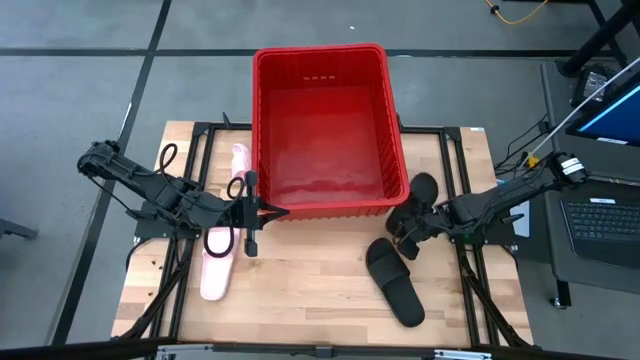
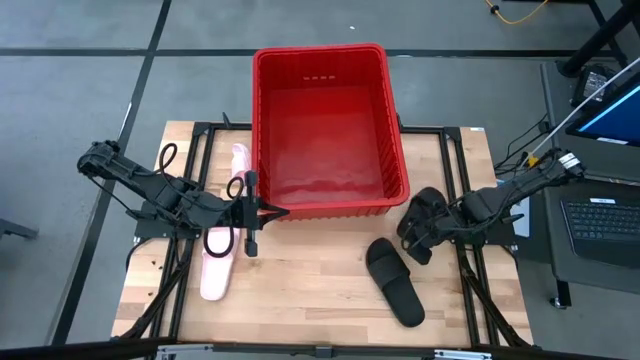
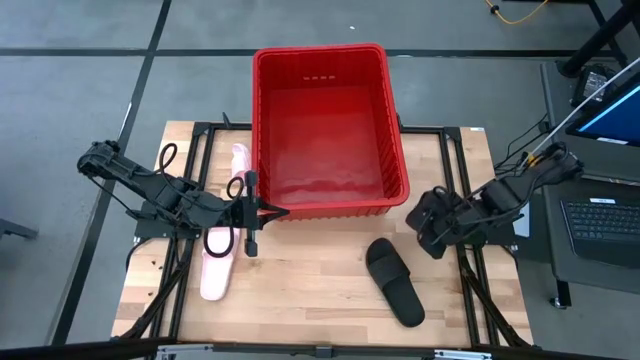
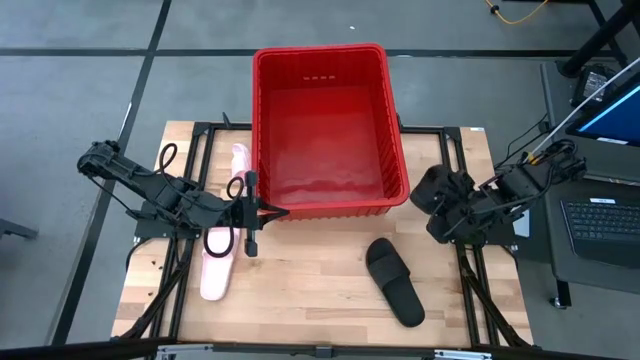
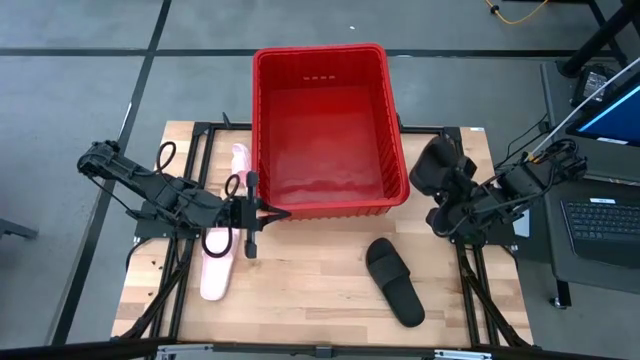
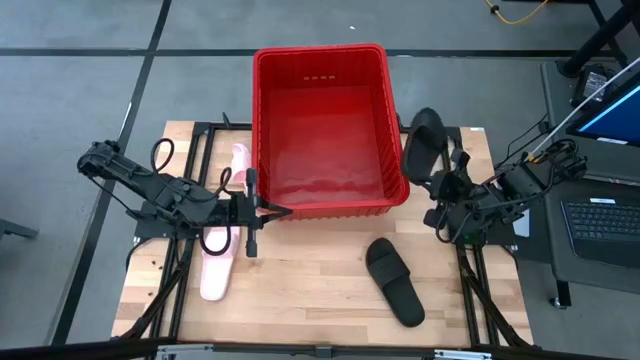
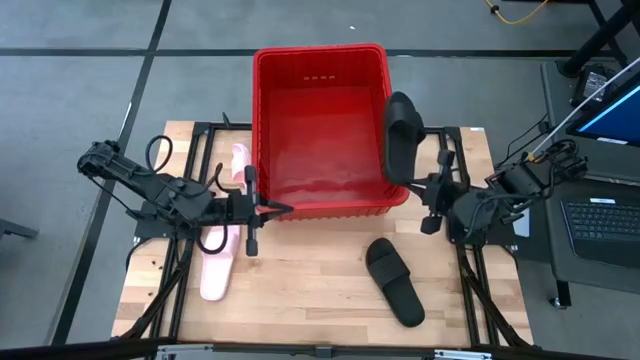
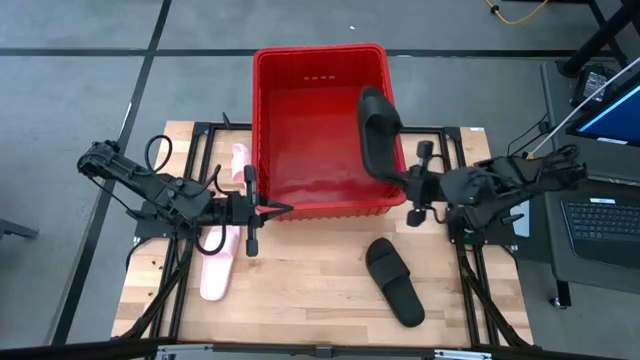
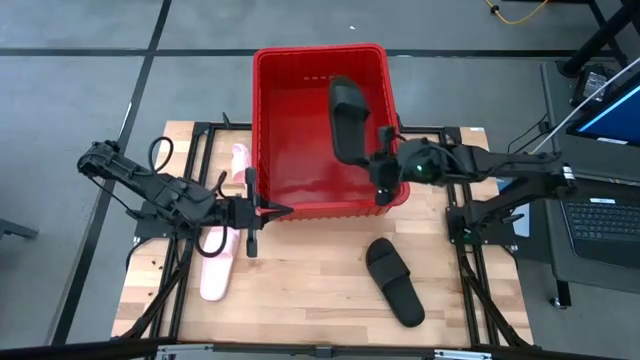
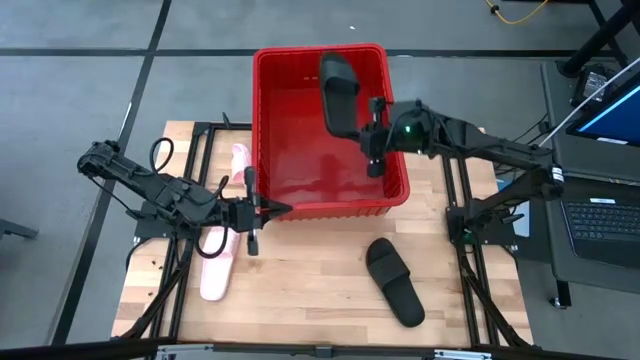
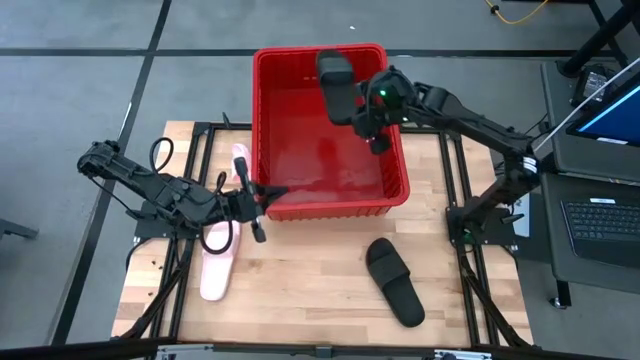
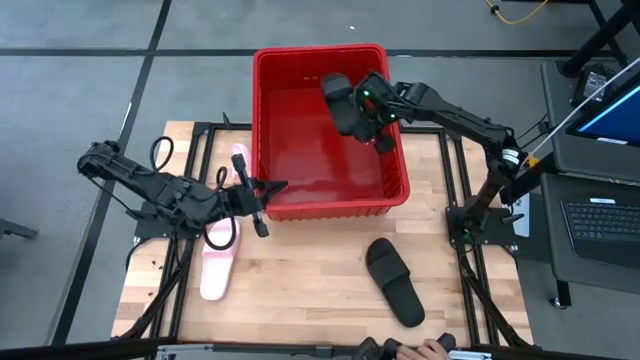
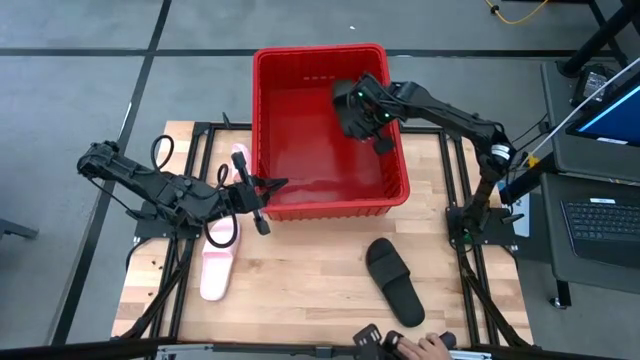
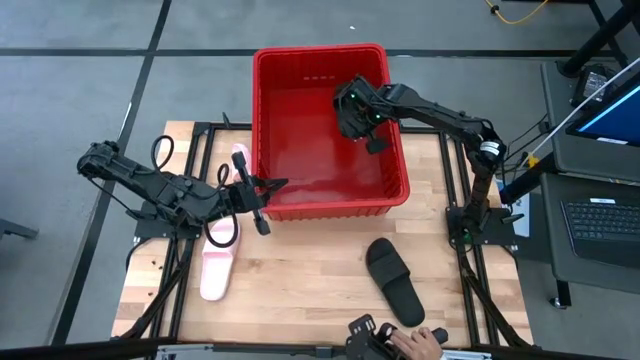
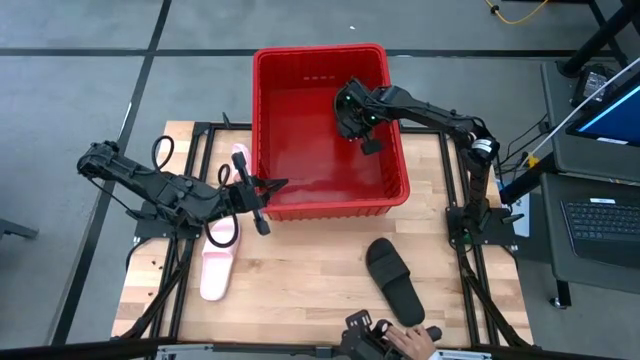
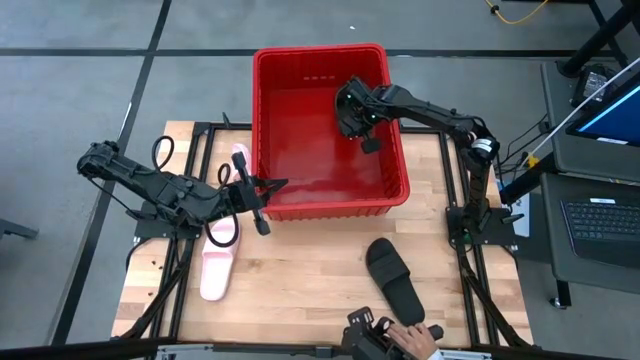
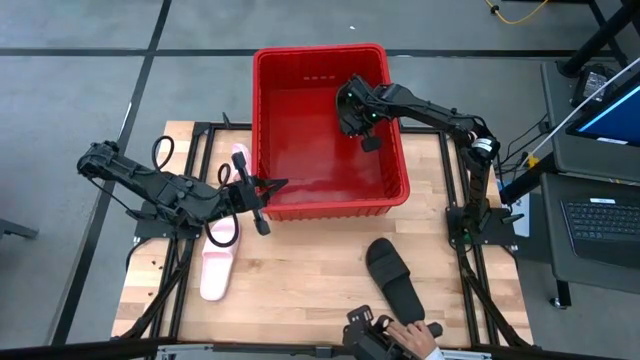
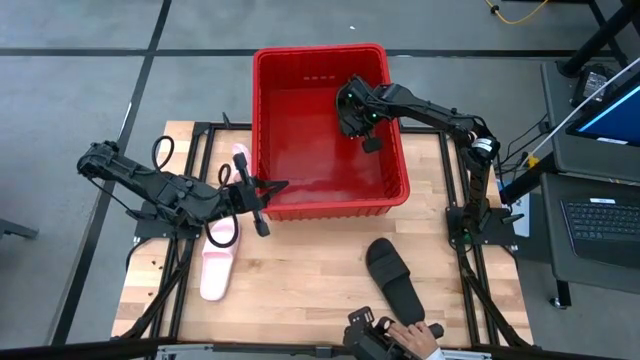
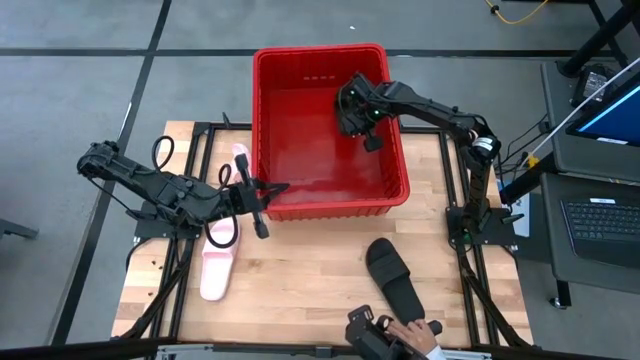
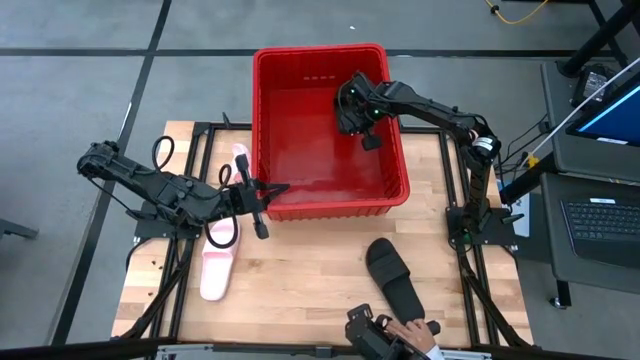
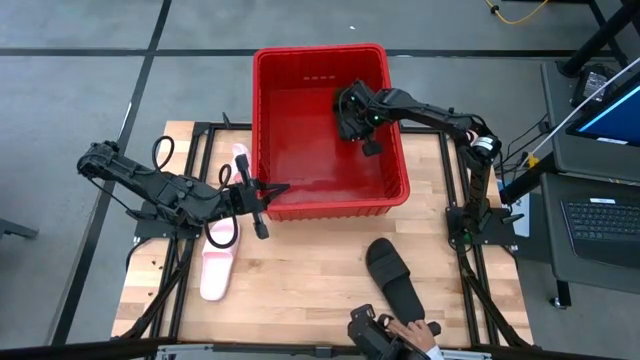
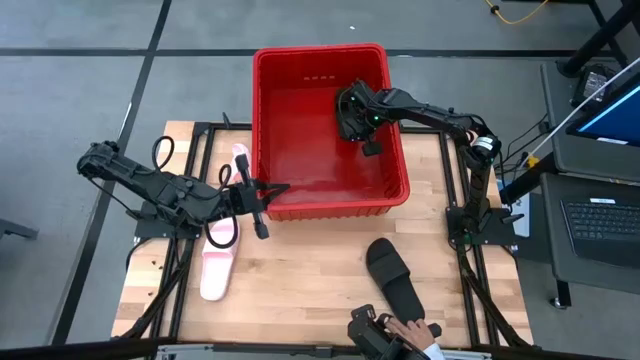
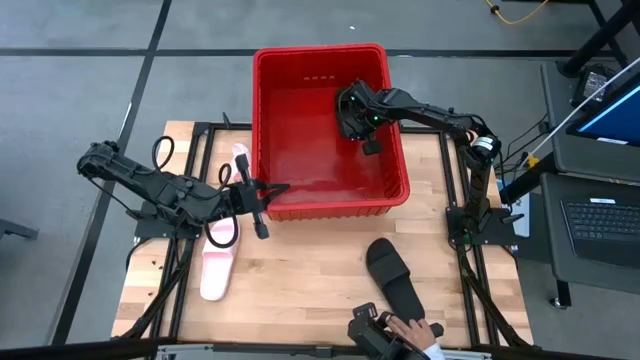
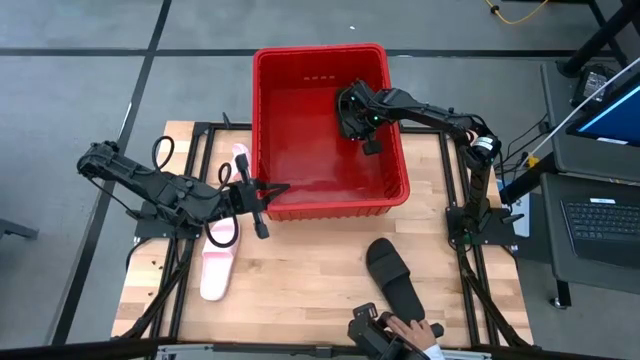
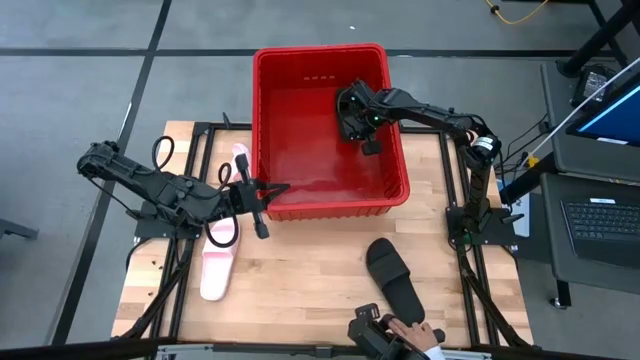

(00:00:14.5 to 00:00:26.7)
Task: Pick and place slides into bin
Put the top black slide in the red bin

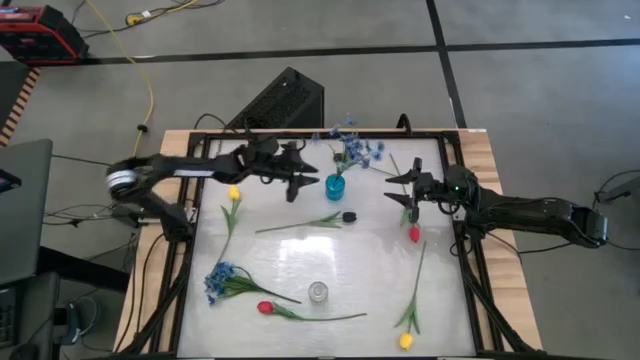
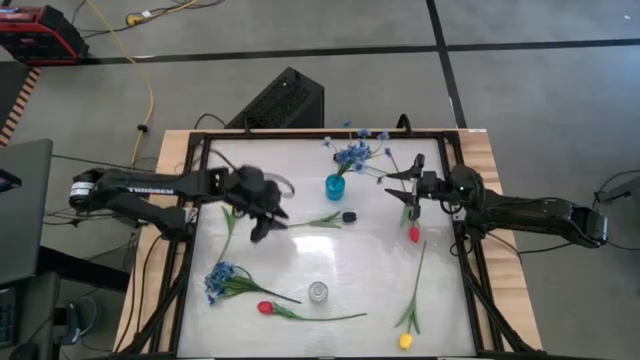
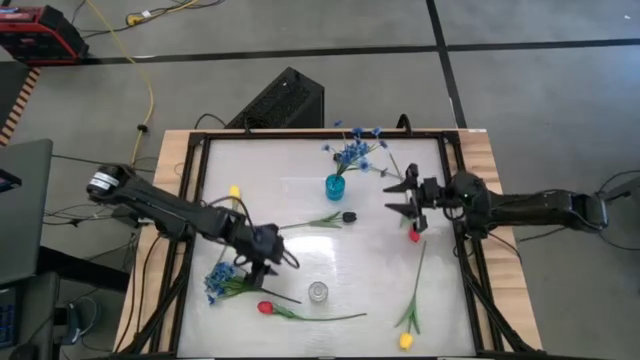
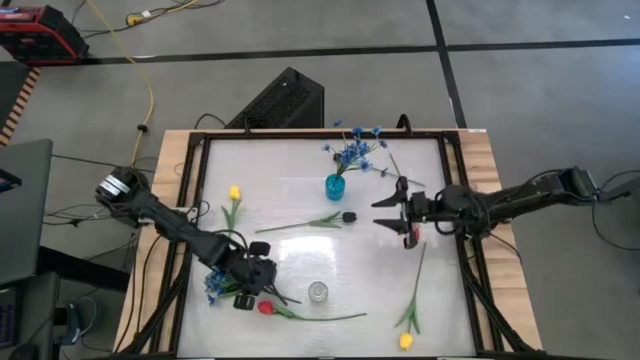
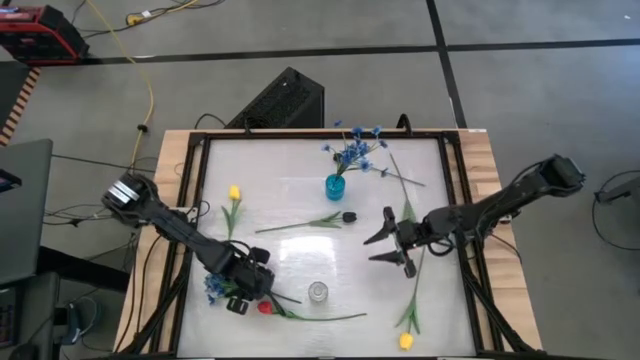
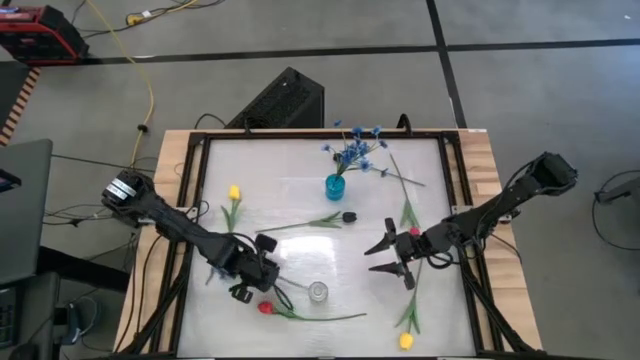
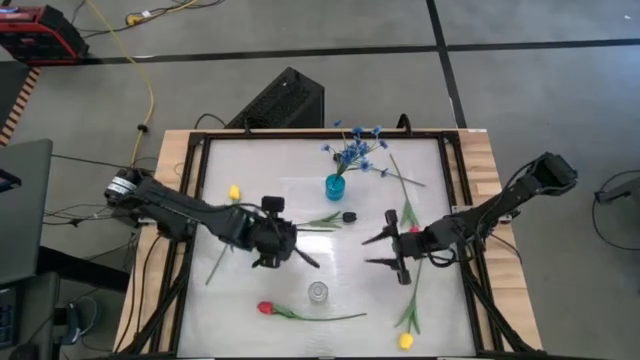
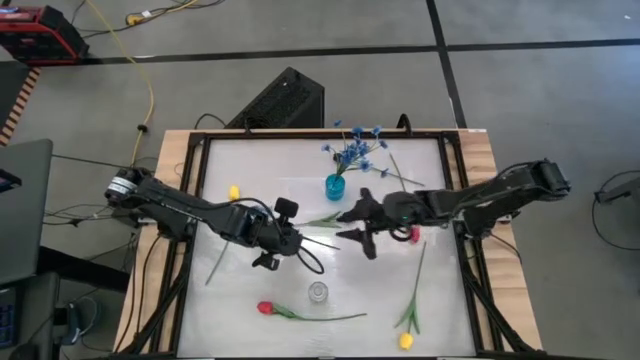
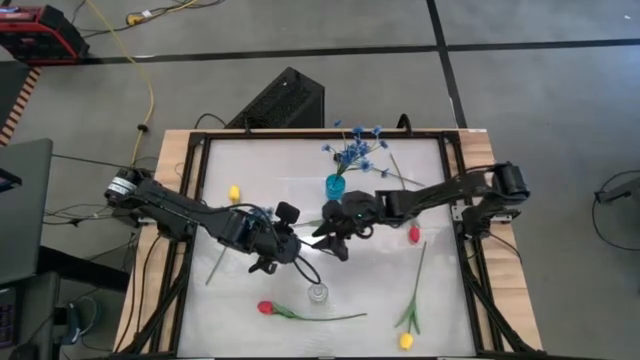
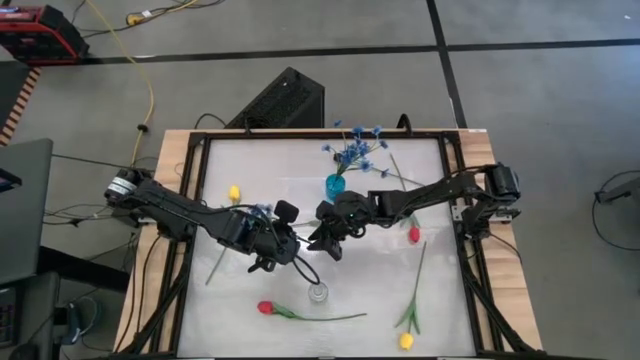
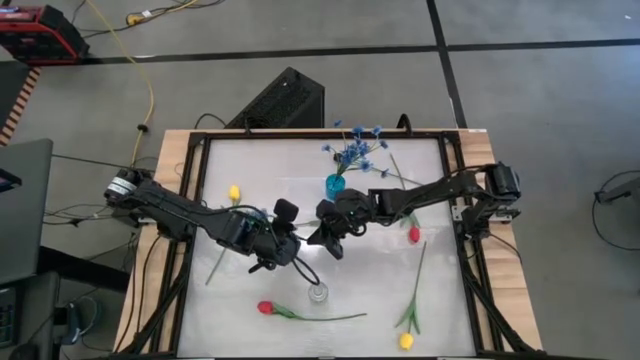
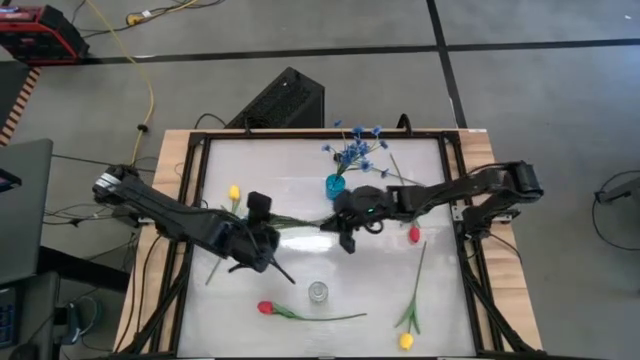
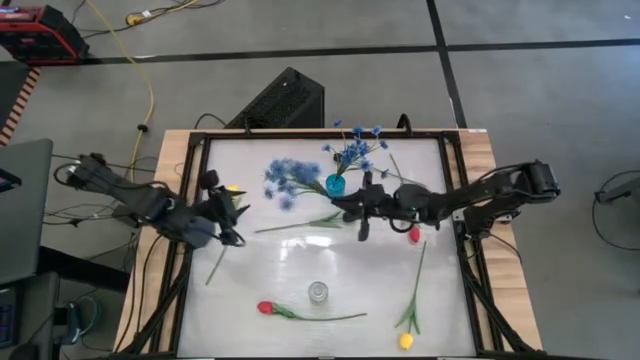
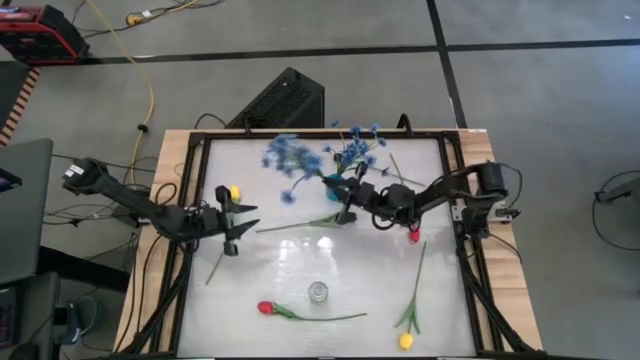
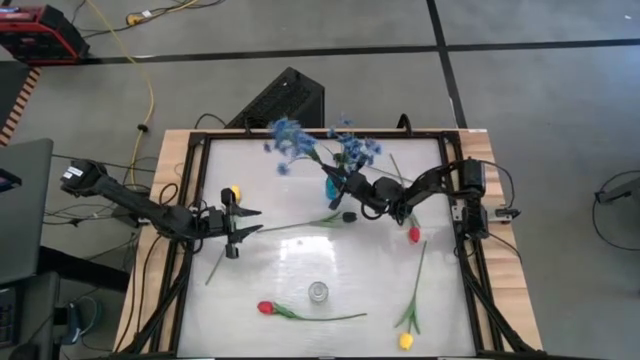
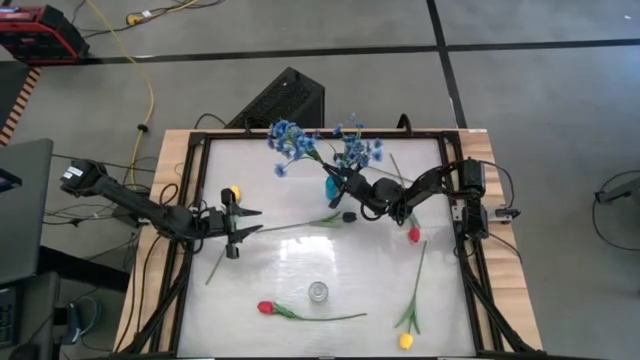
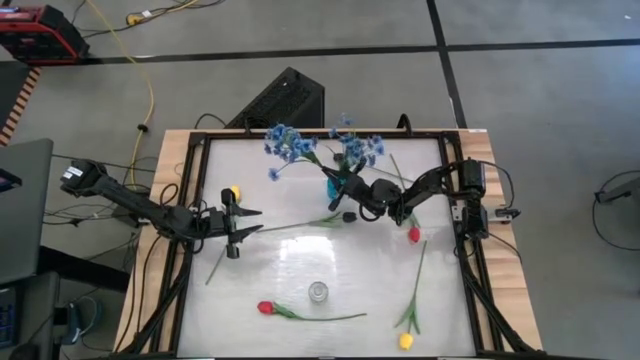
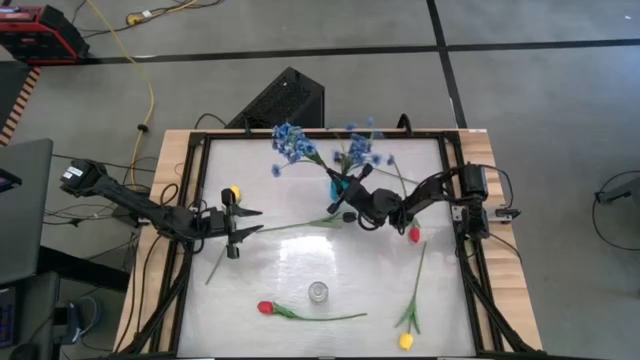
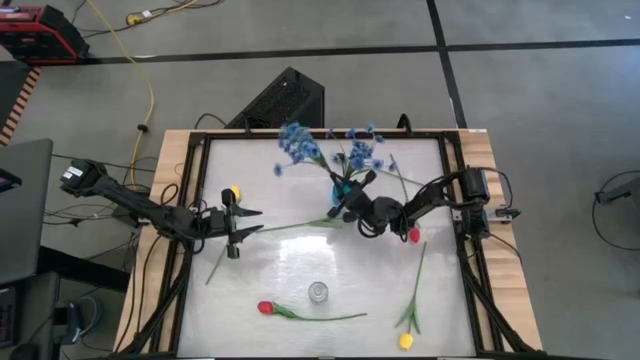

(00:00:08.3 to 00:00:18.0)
Task: Sort flowers into vase by color
Put the blue flowers into the blue vase
